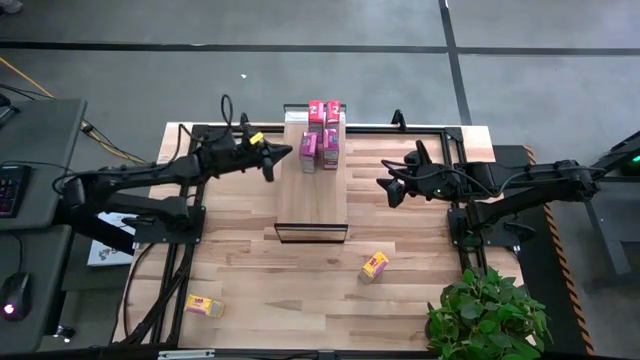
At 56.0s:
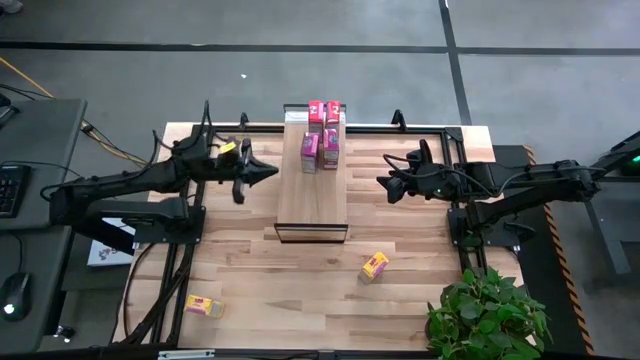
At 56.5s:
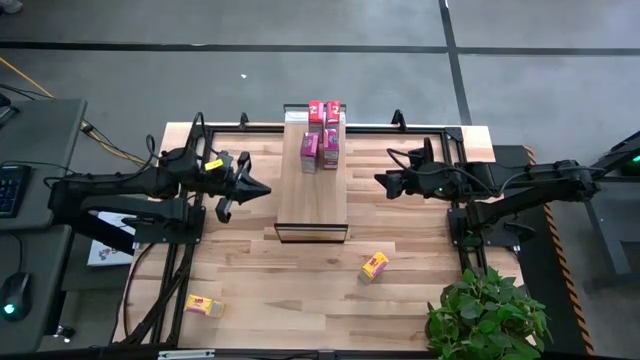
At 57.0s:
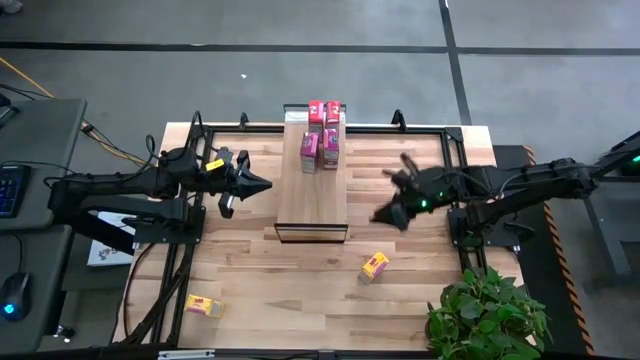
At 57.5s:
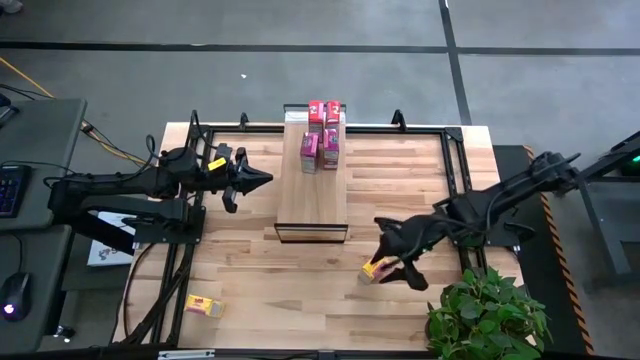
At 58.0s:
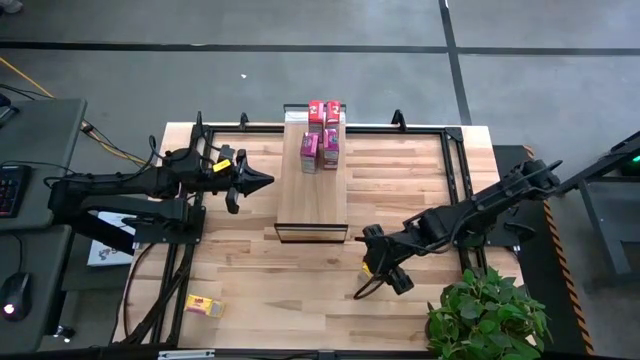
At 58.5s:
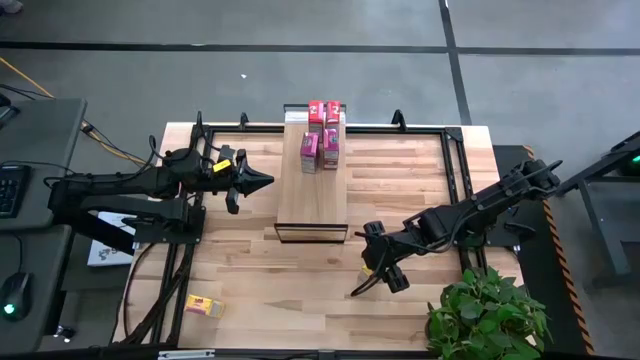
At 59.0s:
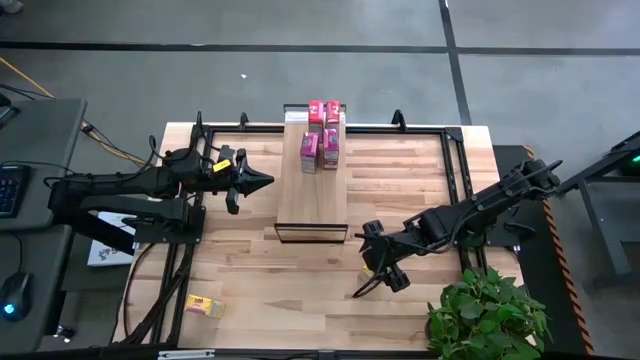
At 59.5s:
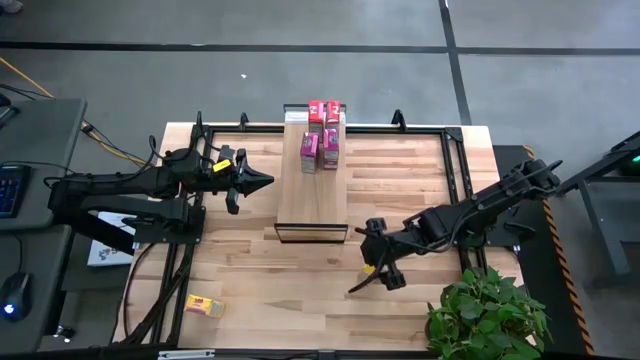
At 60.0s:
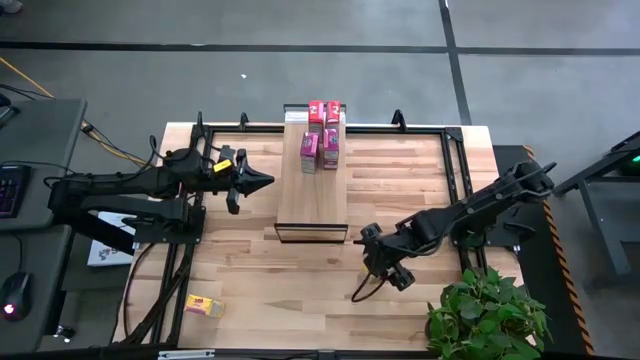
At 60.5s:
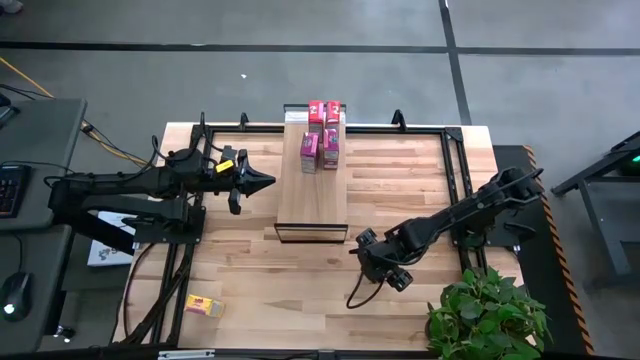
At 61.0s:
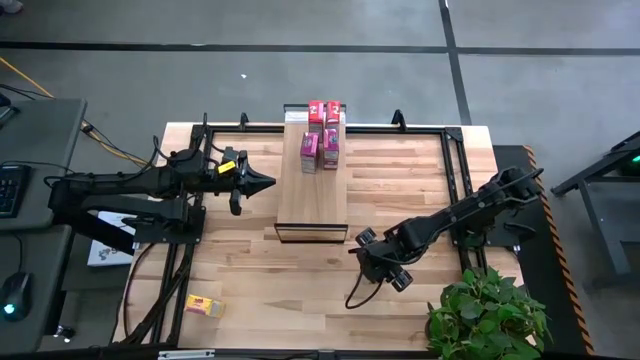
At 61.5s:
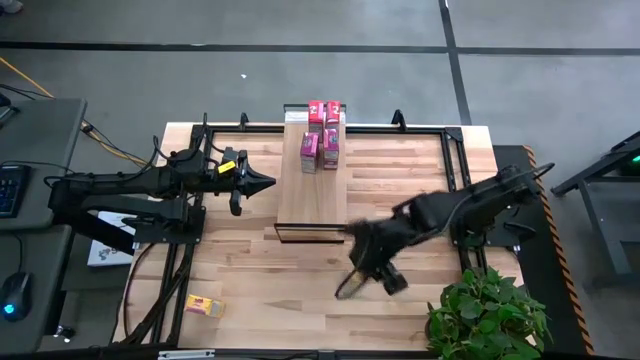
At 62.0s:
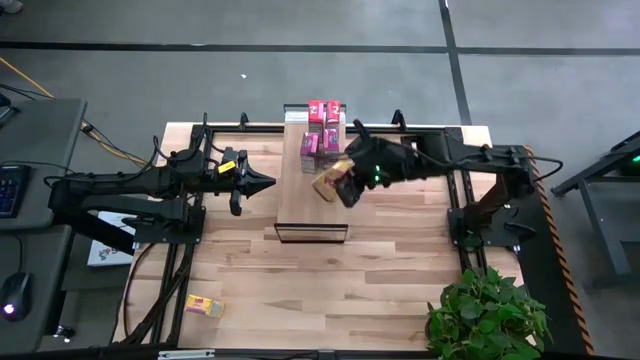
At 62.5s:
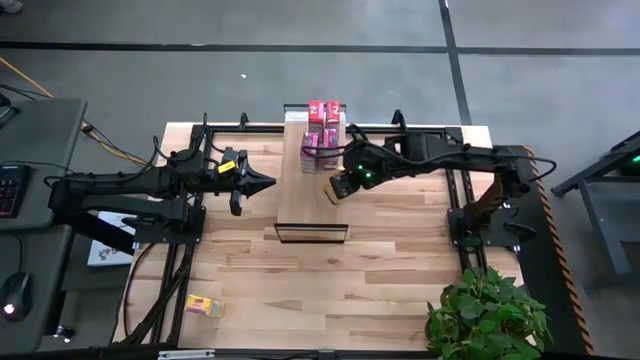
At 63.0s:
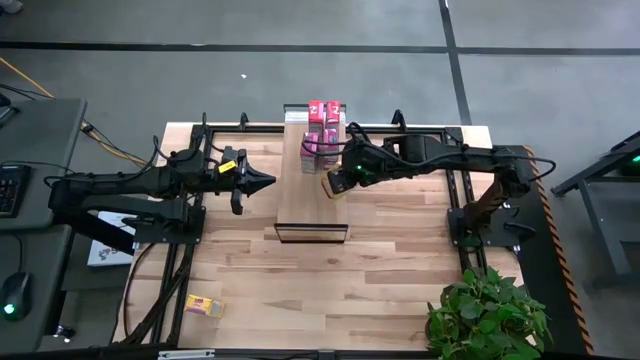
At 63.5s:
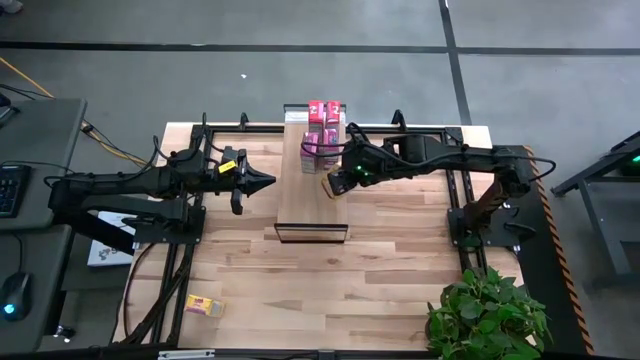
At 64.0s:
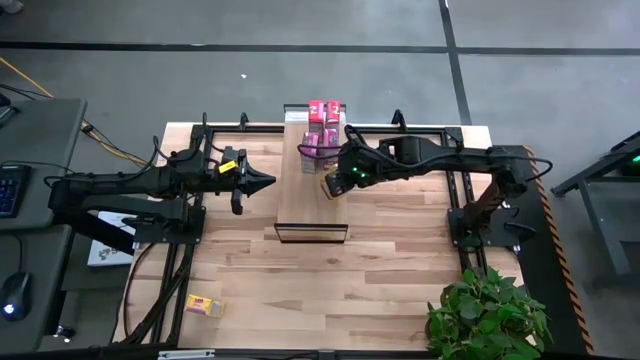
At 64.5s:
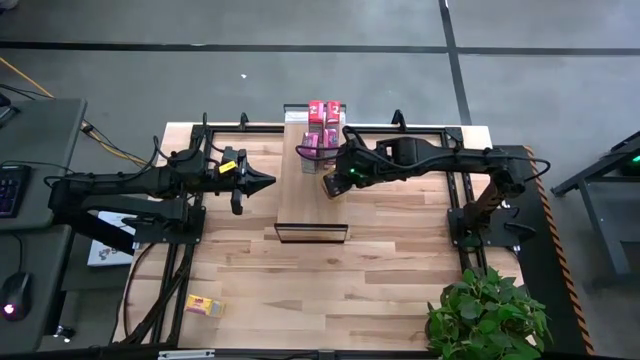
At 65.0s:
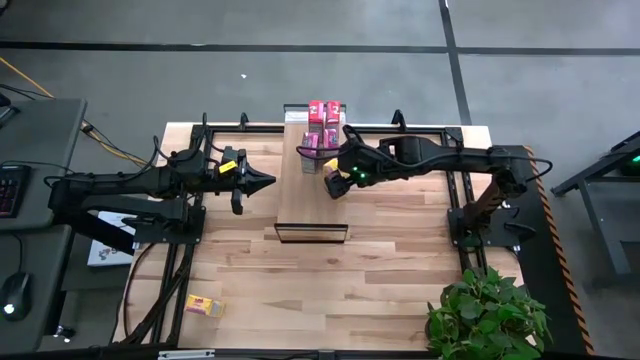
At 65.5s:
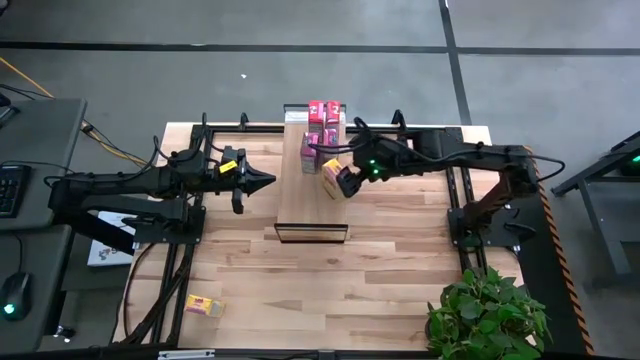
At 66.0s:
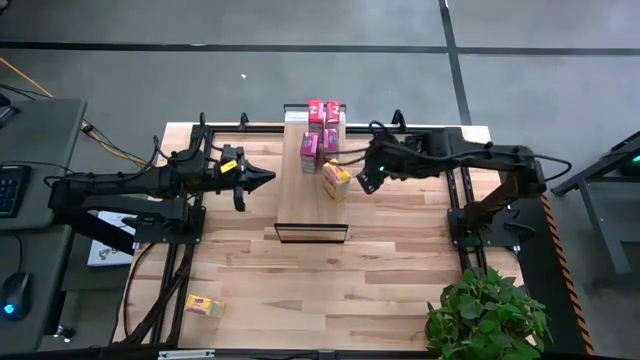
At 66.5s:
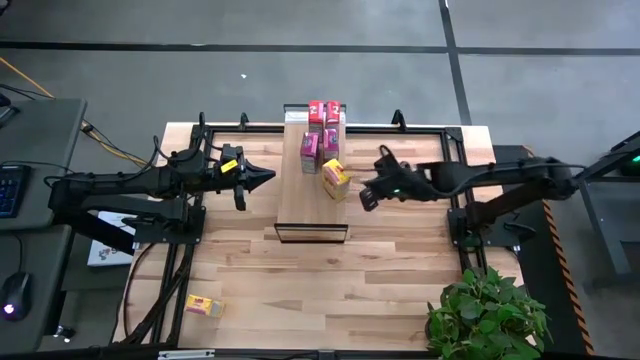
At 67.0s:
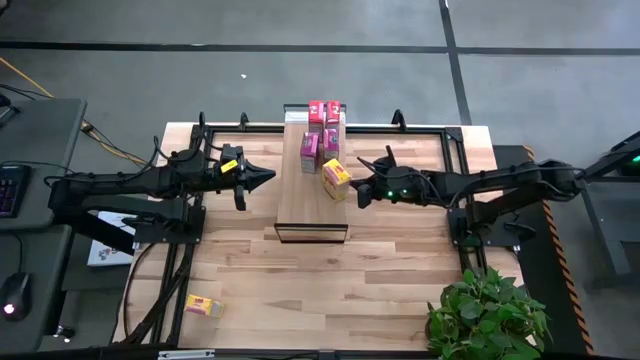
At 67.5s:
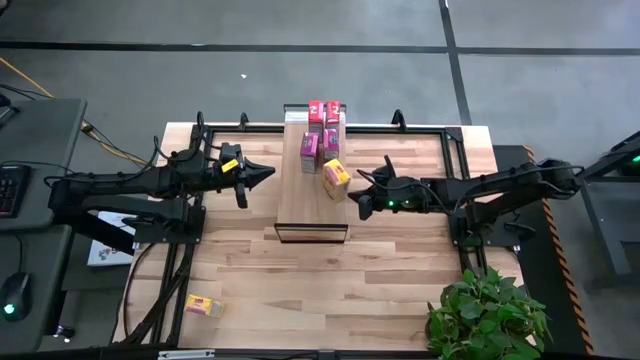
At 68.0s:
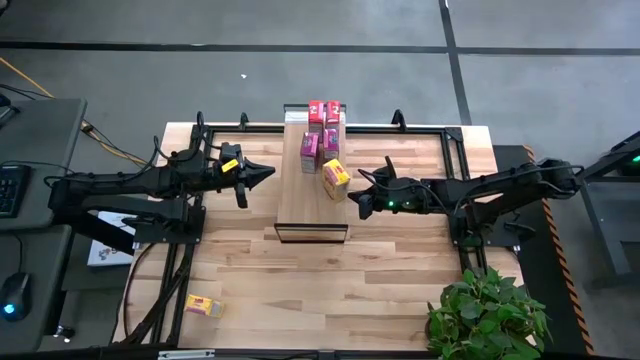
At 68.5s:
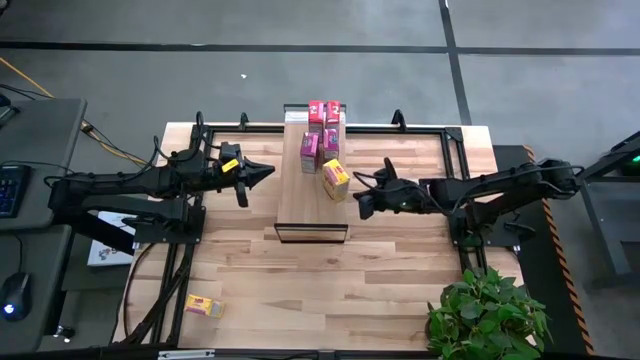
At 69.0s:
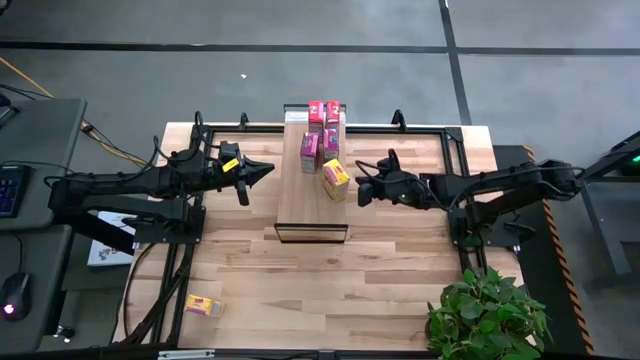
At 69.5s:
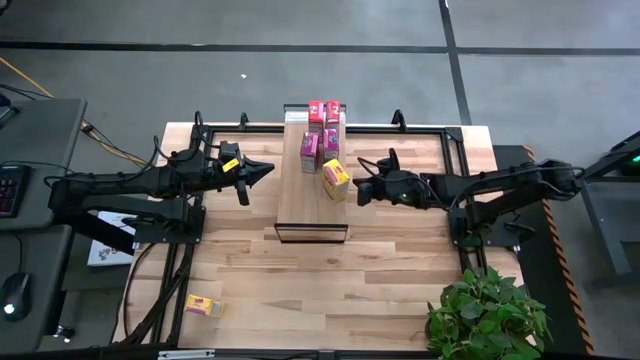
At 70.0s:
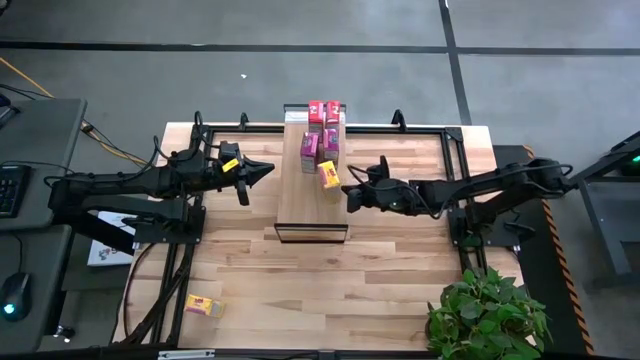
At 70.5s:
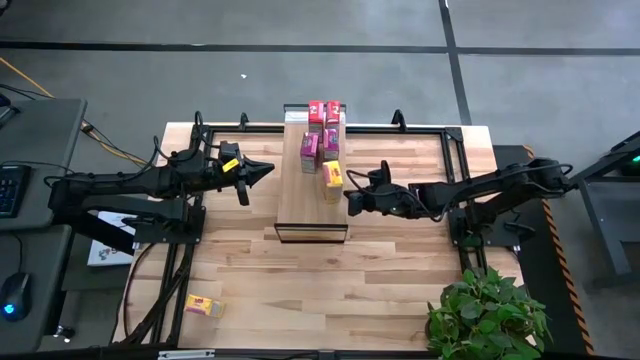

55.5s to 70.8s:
Task: Stack cereal on shelf
Put the right yellow cereal box on the shelf

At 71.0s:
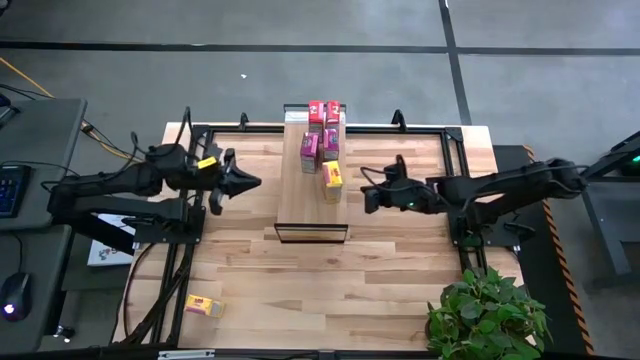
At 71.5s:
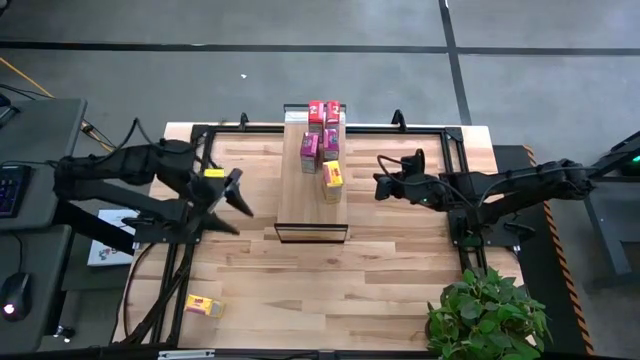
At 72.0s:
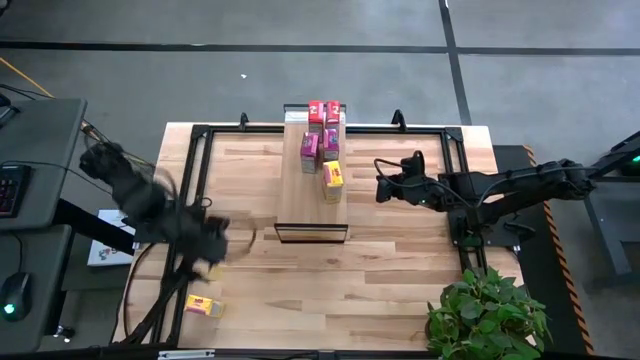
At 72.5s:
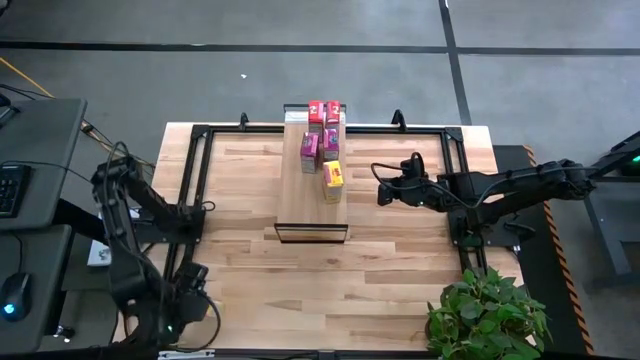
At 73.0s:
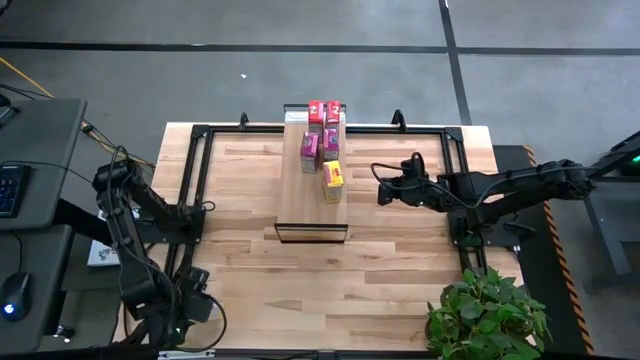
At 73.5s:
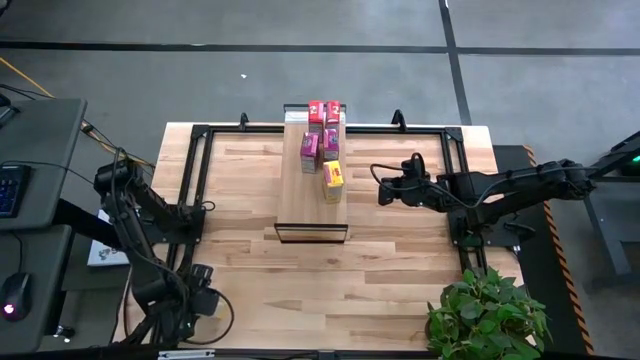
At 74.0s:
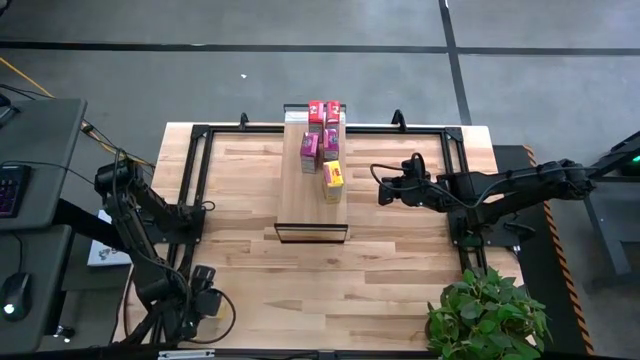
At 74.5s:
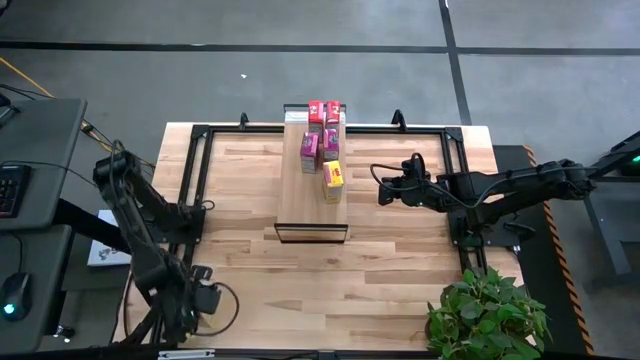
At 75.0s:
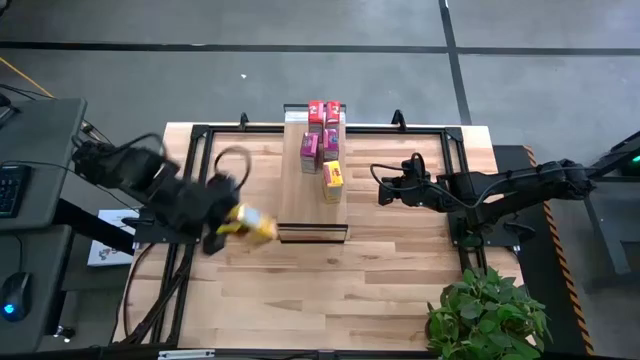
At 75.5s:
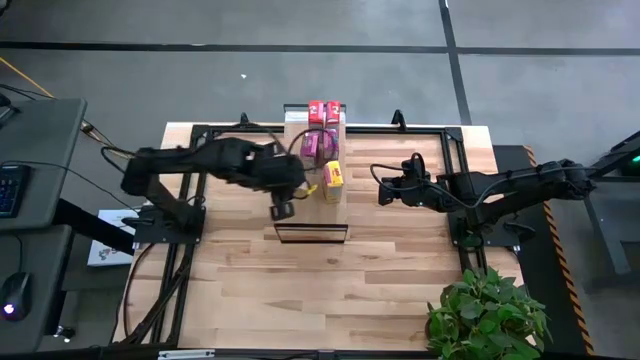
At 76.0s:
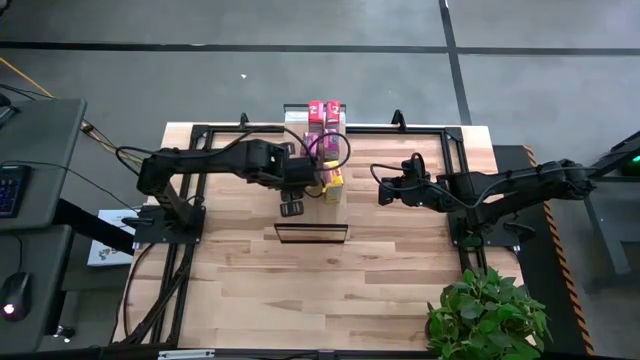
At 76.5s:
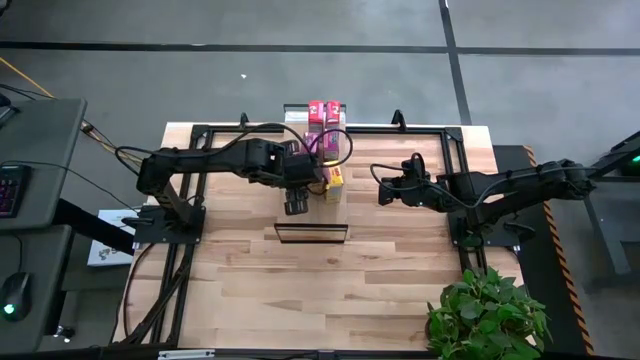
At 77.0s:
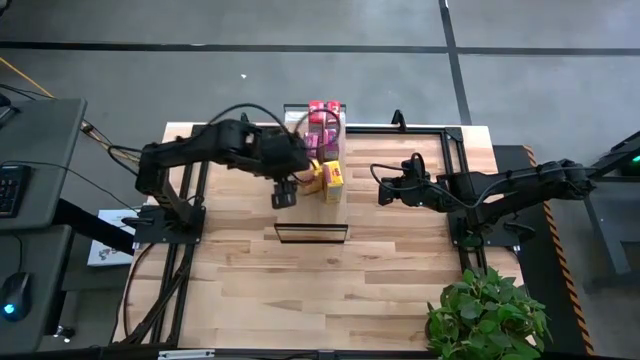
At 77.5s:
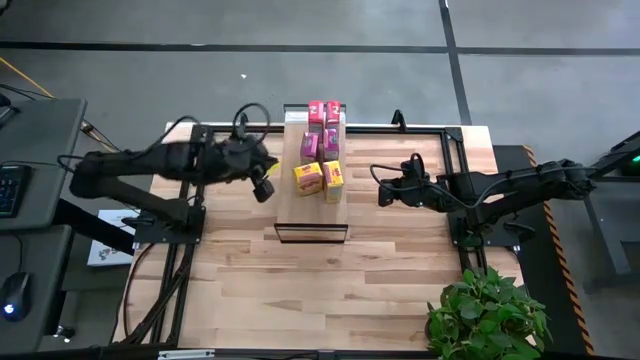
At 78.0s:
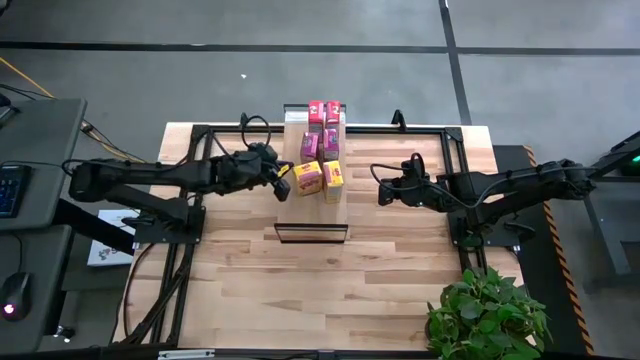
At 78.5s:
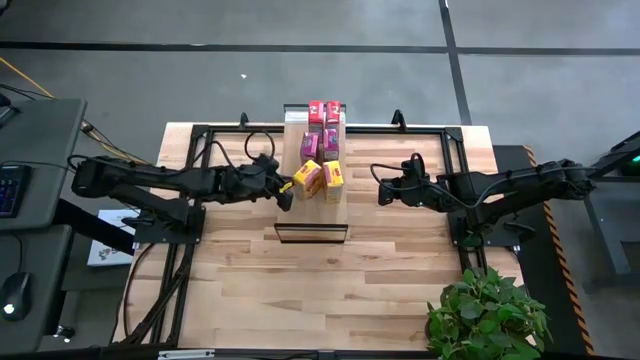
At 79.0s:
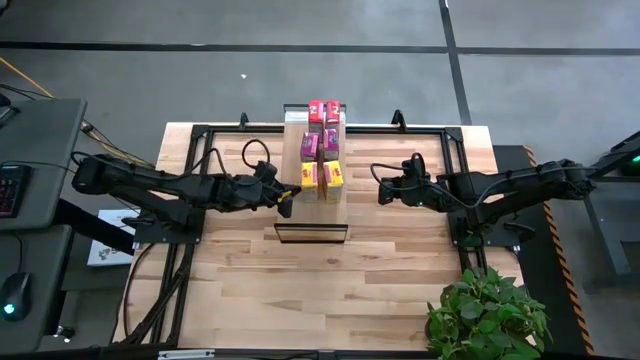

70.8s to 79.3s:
Put the yellow cereal box on the shelf aligned with the other yellow cereal box
